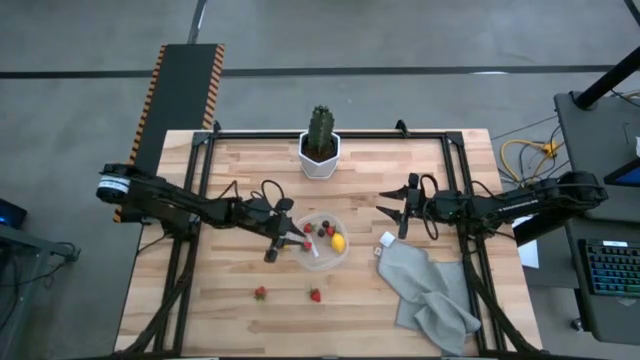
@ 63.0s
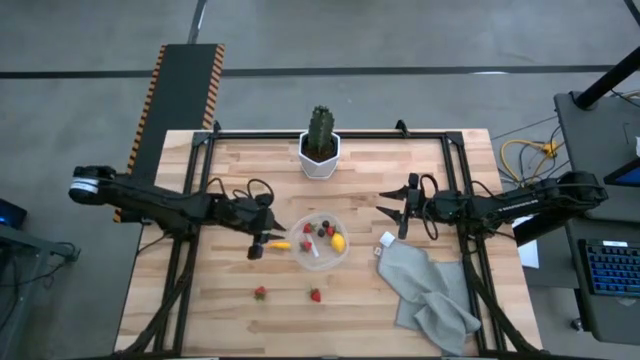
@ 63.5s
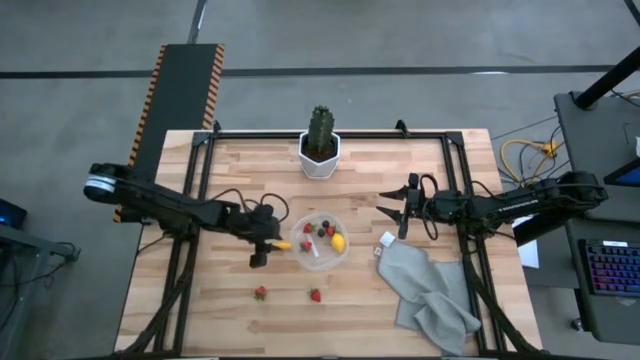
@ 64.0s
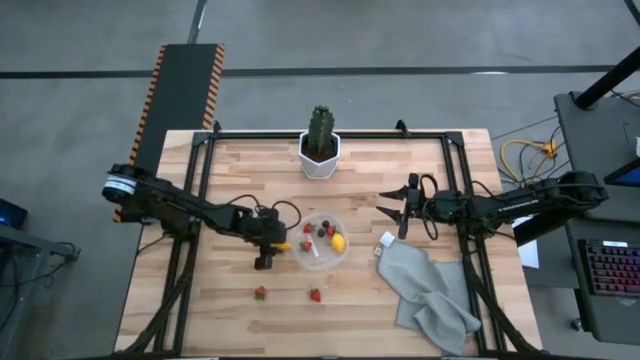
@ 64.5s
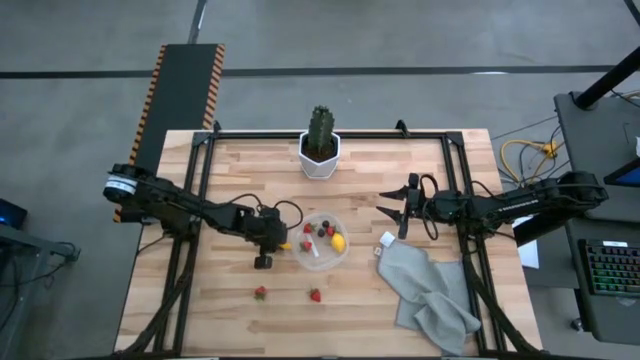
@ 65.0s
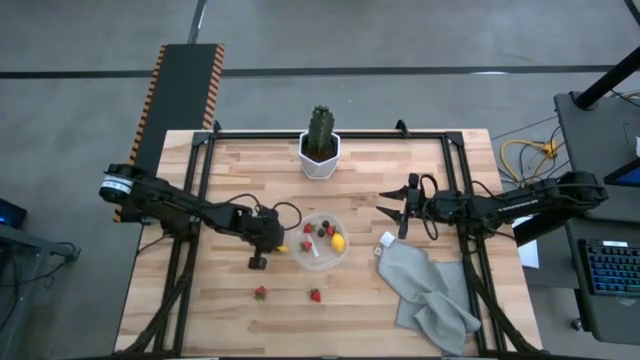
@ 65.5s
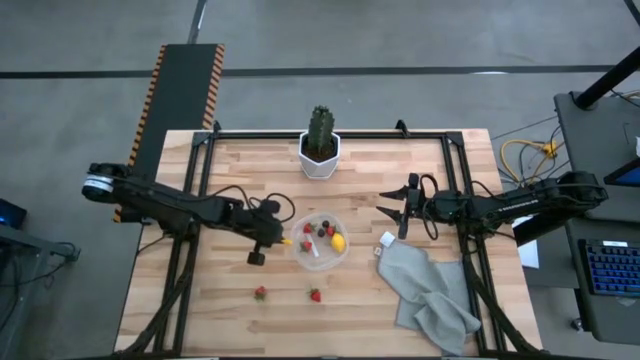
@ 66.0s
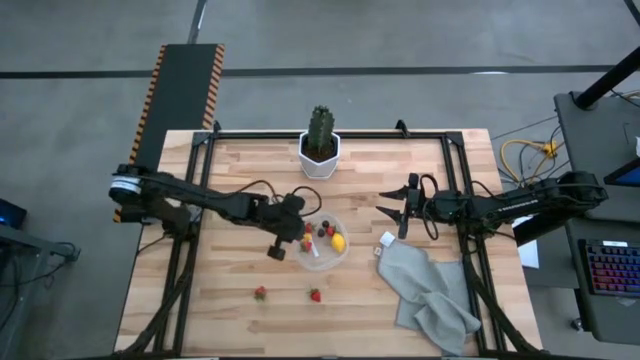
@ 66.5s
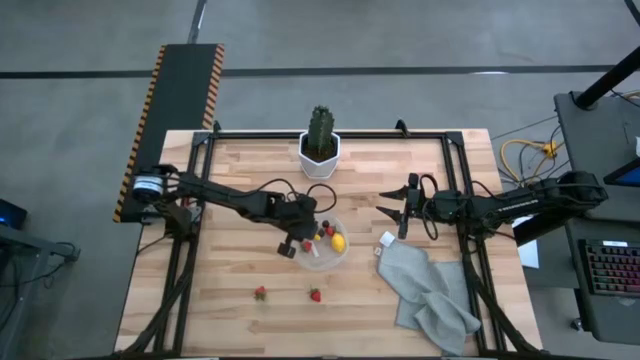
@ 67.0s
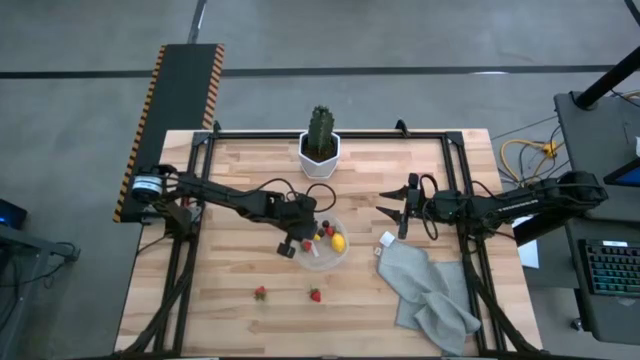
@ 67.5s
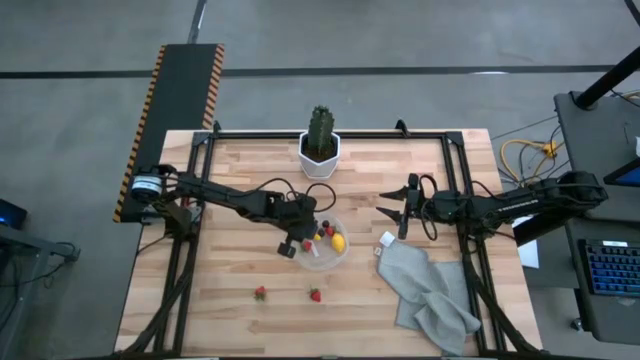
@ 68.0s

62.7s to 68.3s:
Task: Pick and placing Produce into tupperware
Put the yellow corn into the transparent container

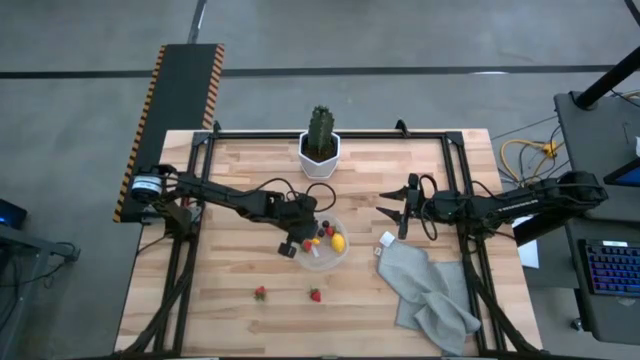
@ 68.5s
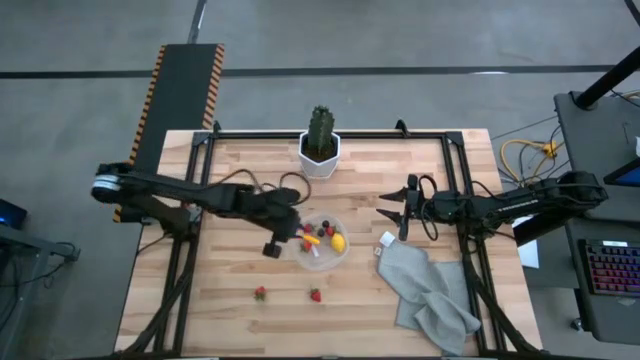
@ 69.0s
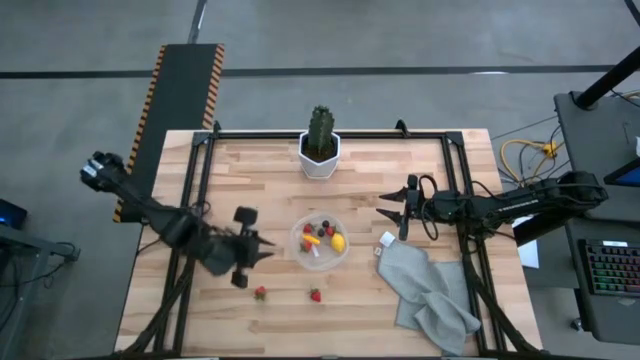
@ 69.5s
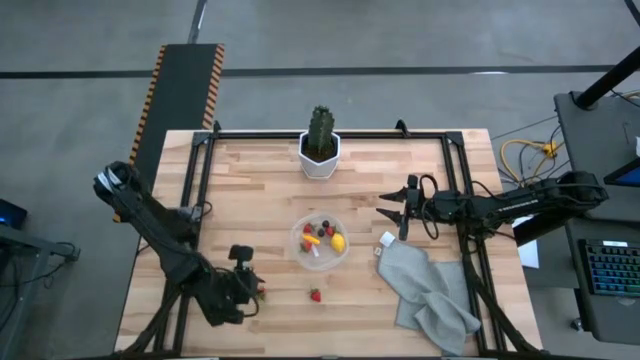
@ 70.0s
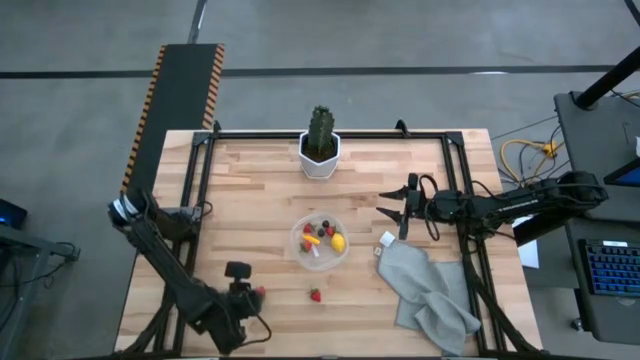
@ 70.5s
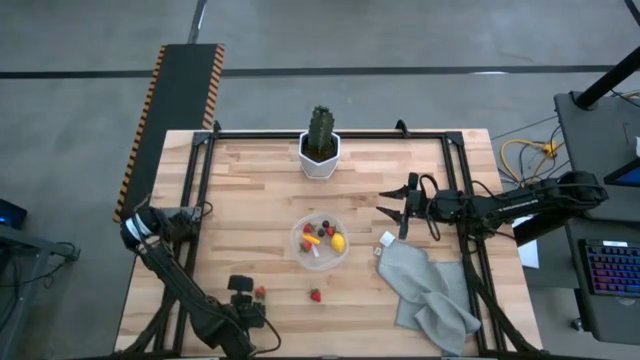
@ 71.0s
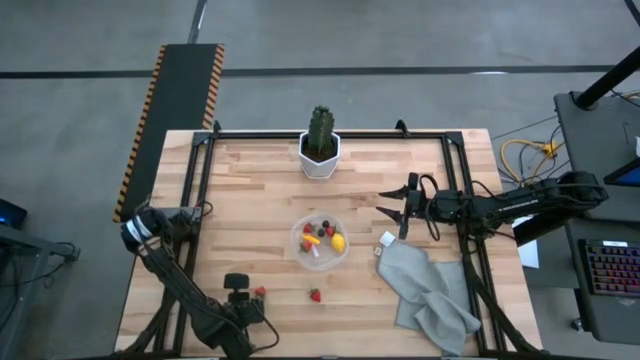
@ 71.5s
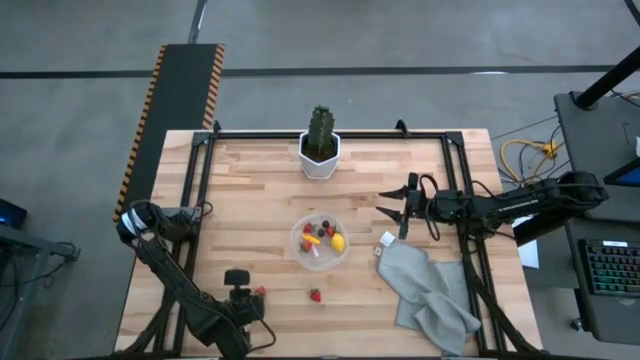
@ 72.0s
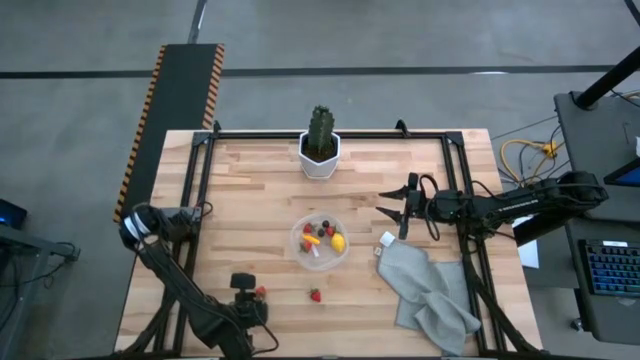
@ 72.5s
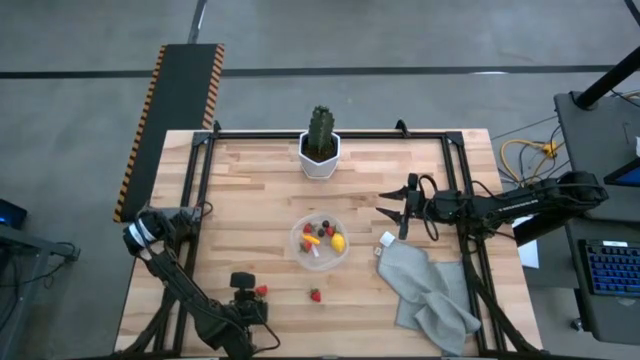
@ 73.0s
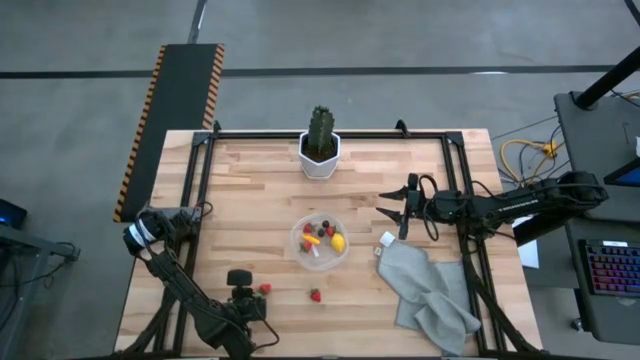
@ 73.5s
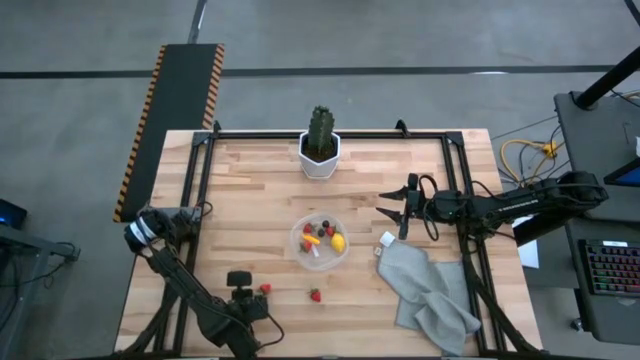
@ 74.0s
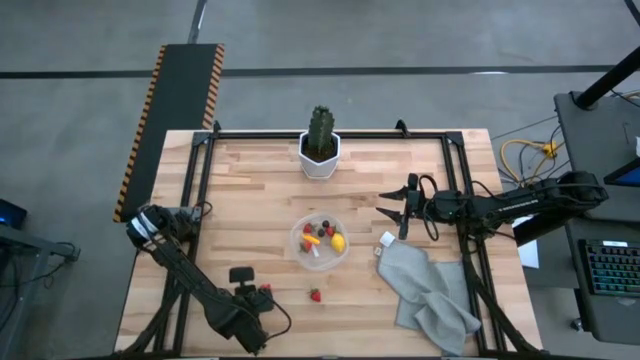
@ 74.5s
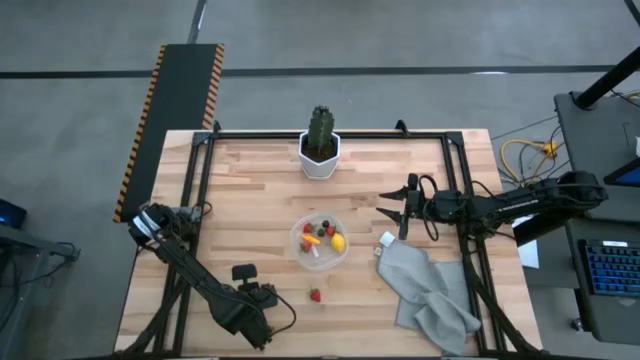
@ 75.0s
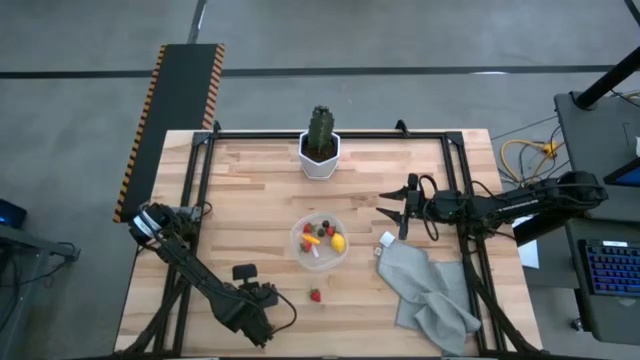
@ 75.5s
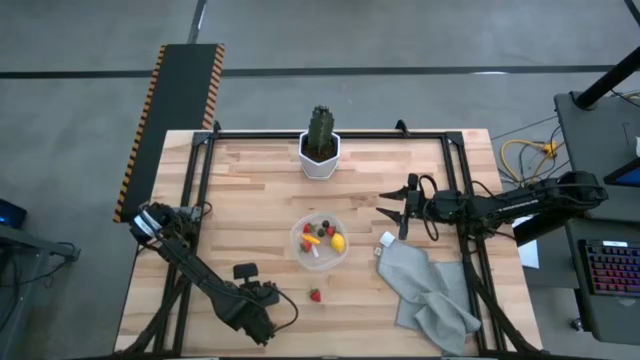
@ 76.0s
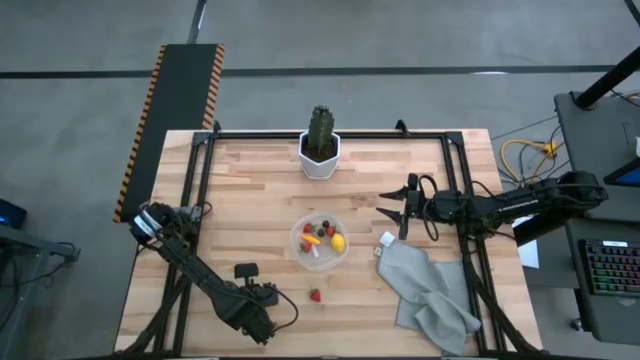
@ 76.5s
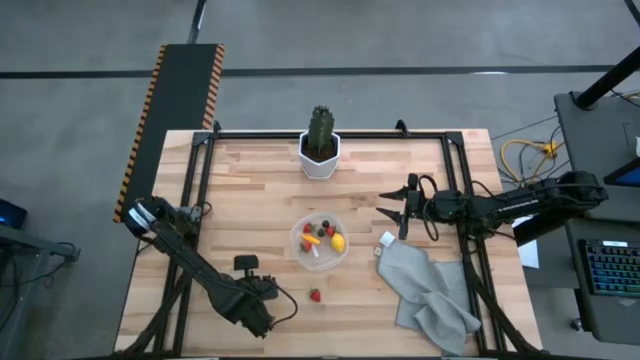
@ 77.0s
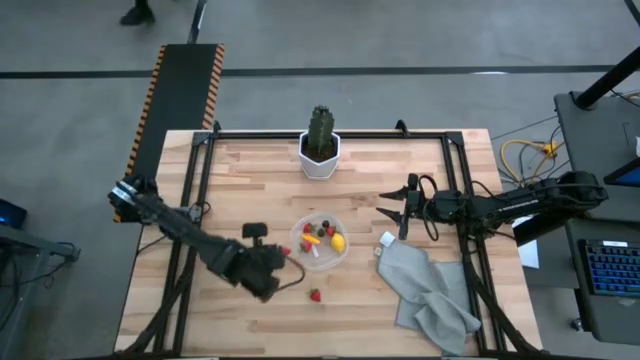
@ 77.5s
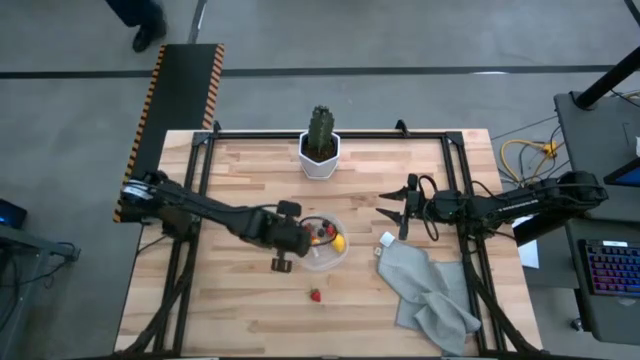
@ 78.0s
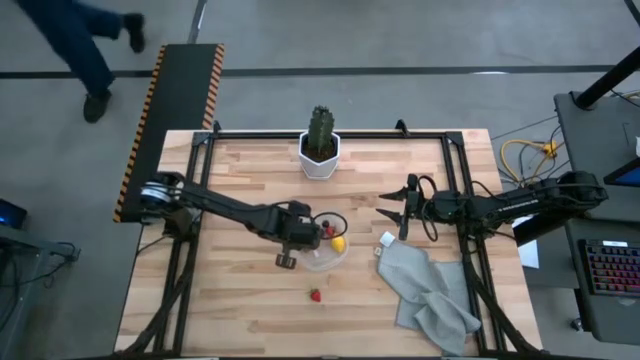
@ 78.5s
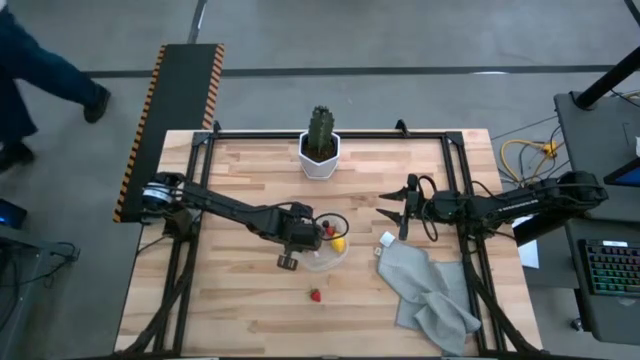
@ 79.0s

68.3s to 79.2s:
Put the red strawberry into the transparent container

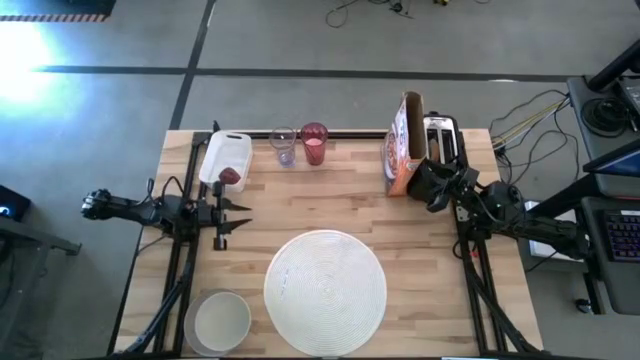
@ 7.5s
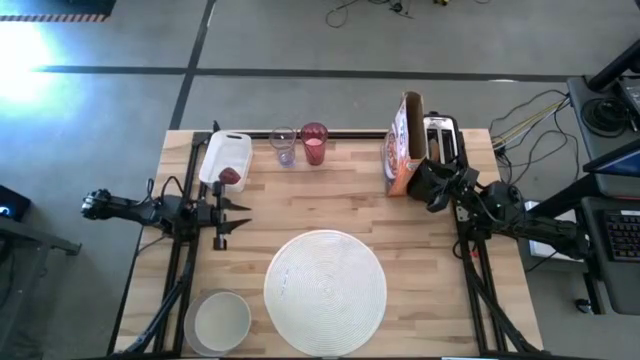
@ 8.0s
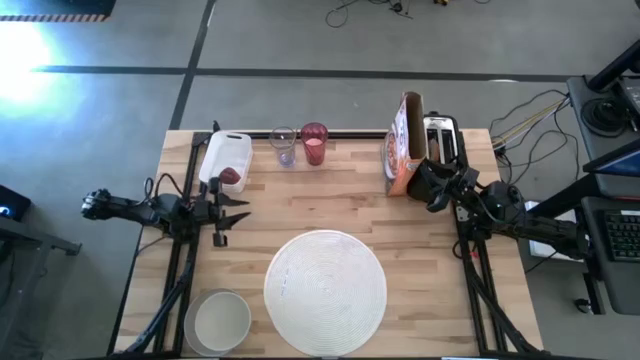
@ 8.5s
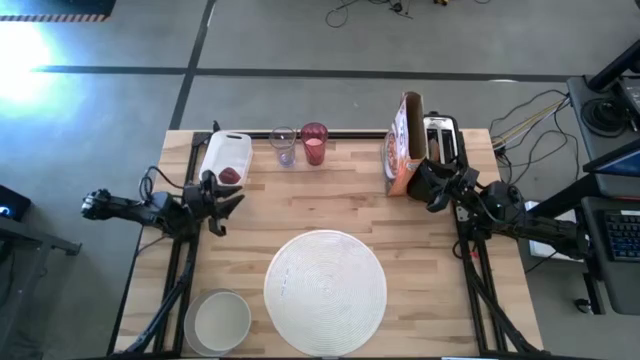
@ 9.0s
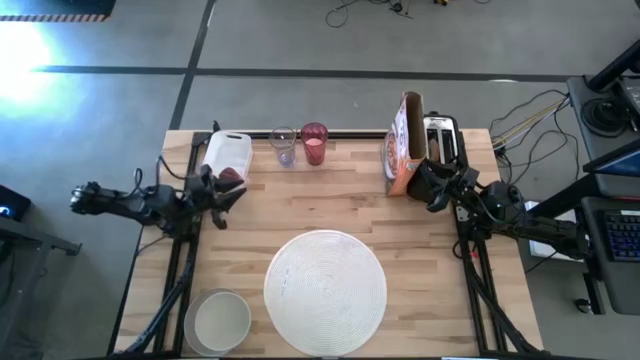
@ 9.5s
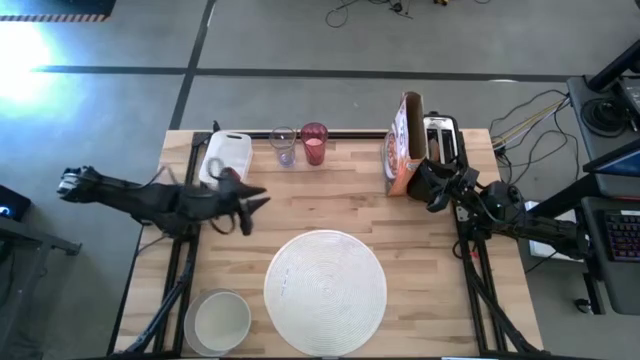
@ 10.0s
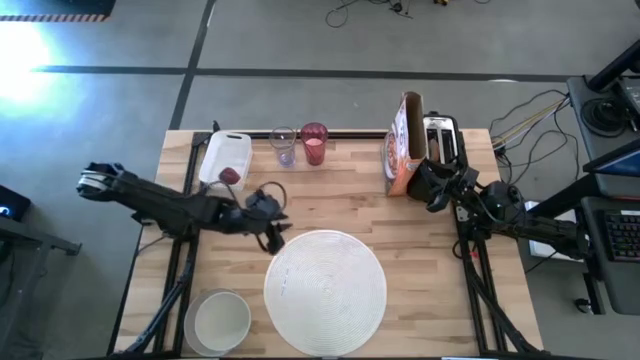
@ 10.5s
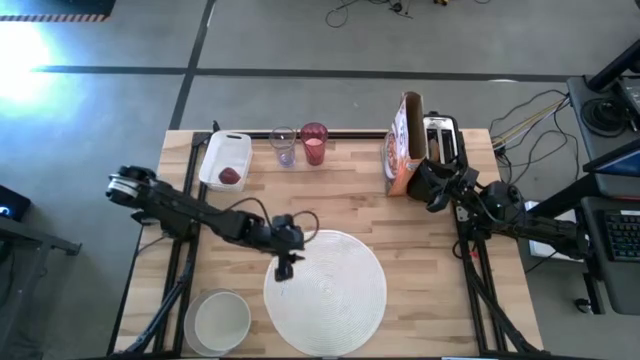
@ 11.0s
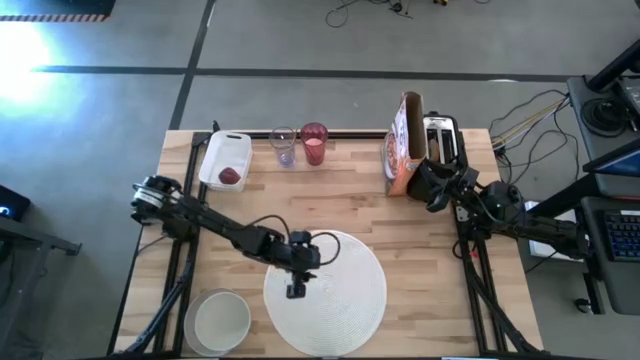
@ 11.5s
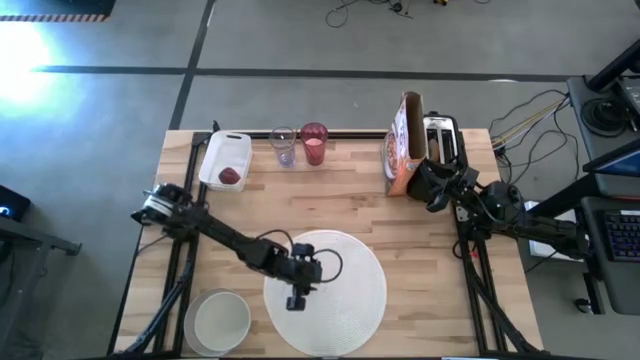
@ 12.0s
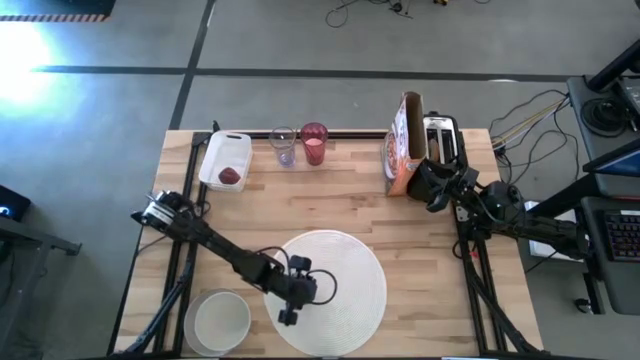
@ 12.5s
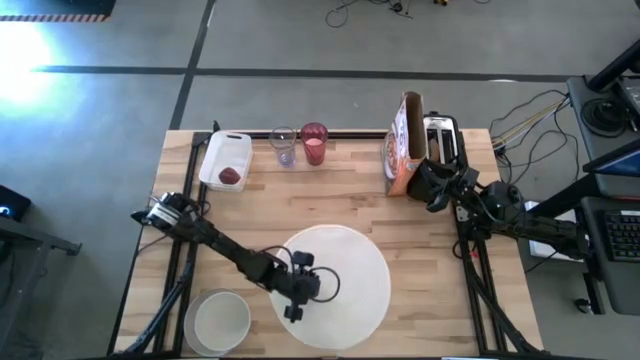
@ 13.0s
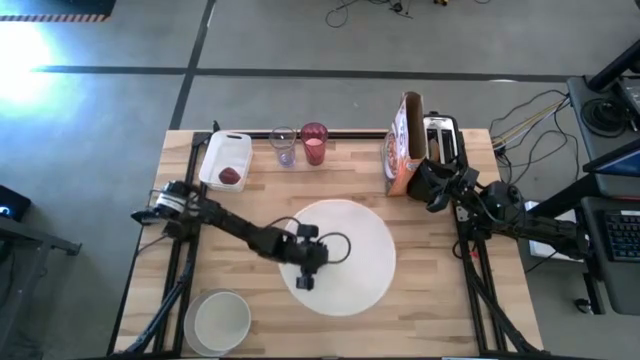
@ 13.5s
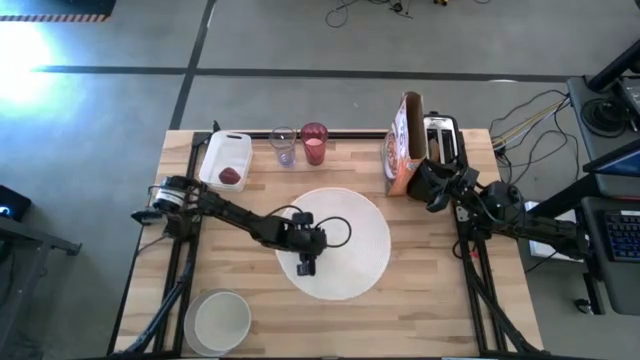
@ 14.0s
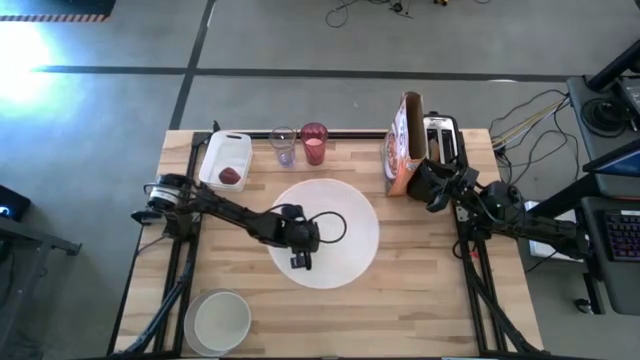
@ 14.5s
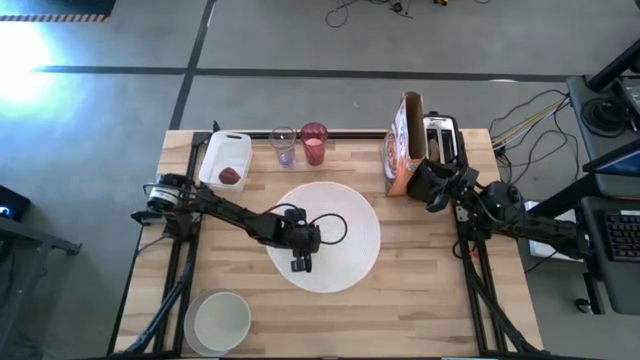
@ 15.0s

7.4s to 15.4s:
Task: Arrange a breakfast setting
Move the white table mat to the center of the table
